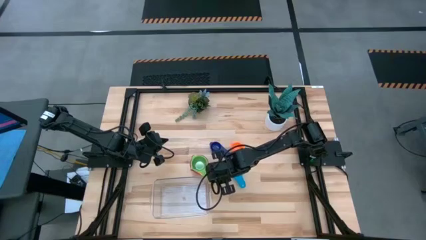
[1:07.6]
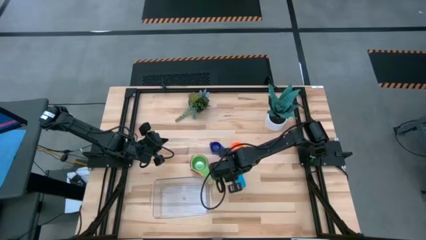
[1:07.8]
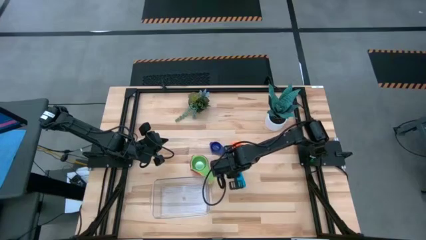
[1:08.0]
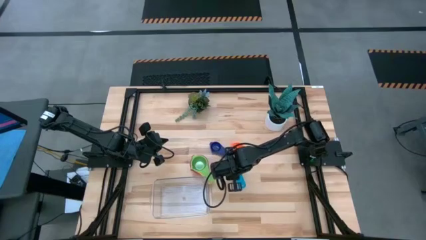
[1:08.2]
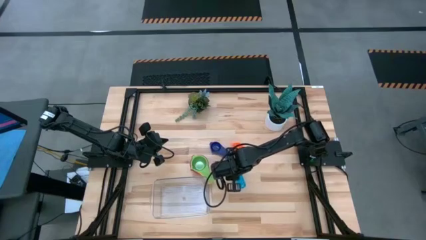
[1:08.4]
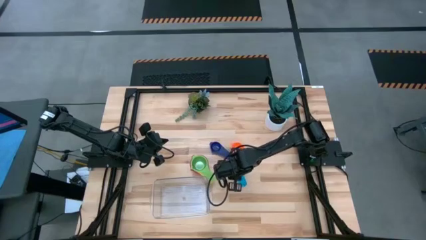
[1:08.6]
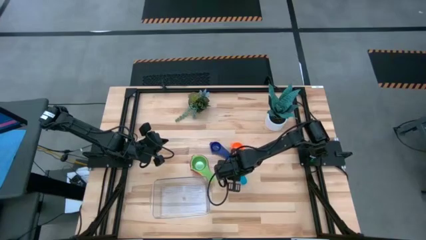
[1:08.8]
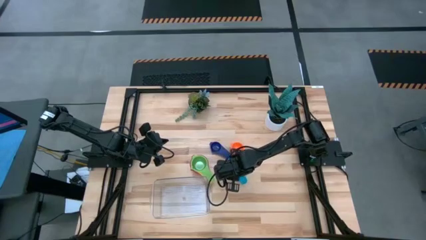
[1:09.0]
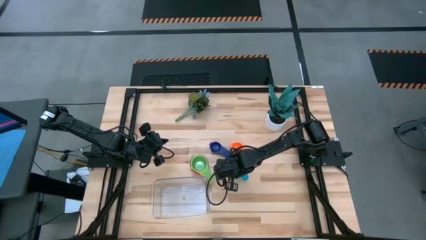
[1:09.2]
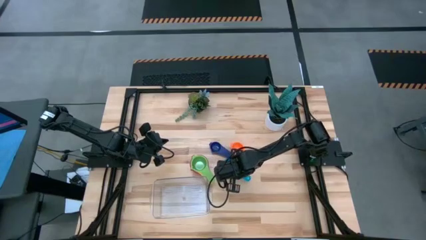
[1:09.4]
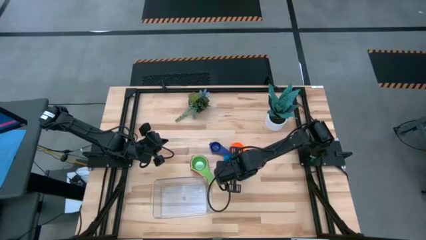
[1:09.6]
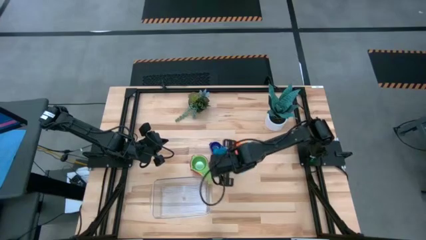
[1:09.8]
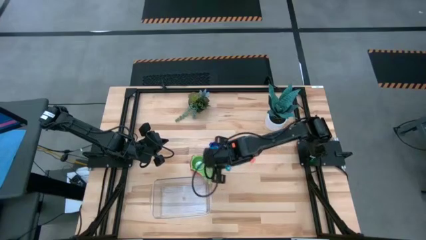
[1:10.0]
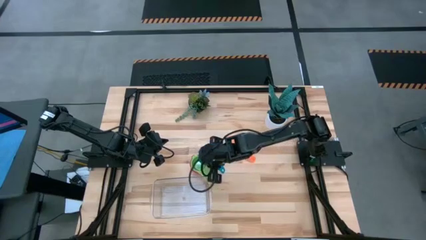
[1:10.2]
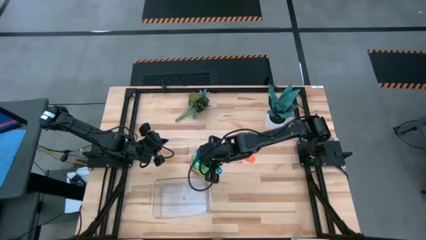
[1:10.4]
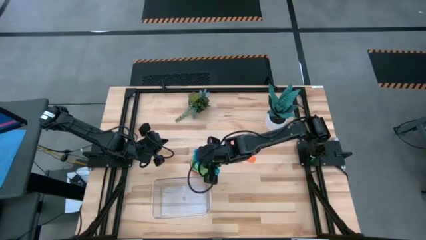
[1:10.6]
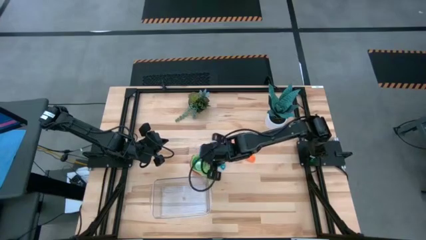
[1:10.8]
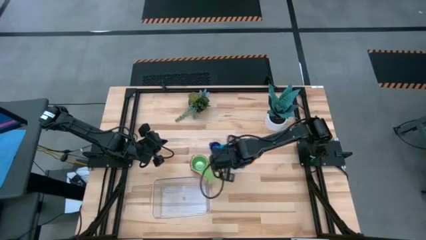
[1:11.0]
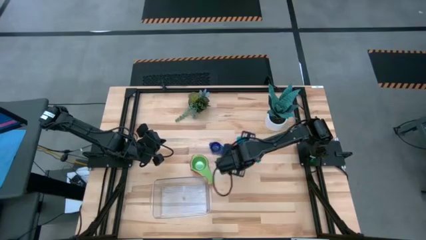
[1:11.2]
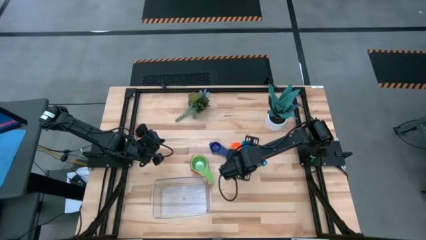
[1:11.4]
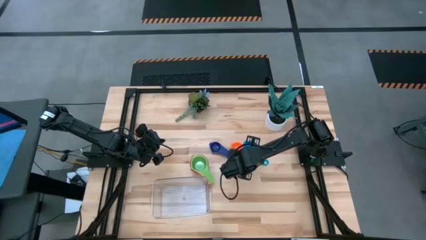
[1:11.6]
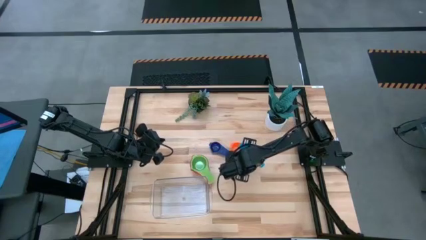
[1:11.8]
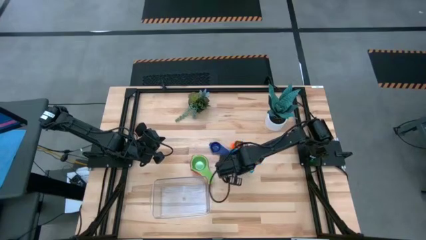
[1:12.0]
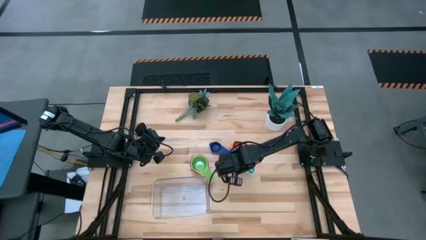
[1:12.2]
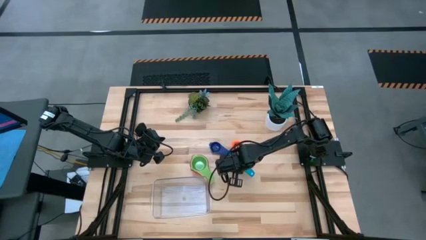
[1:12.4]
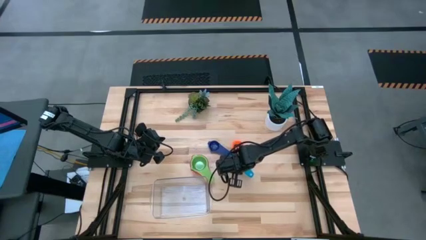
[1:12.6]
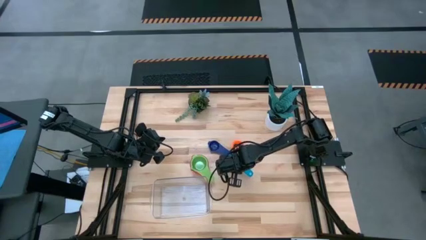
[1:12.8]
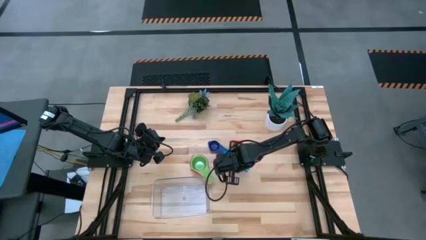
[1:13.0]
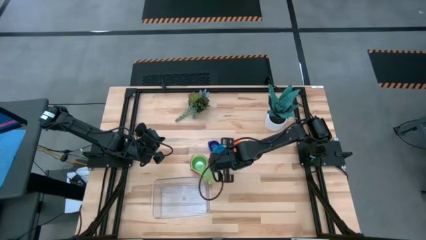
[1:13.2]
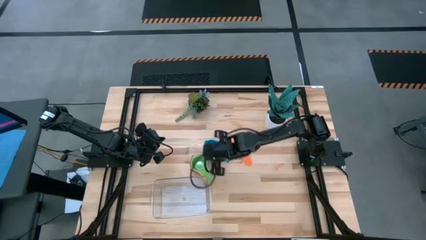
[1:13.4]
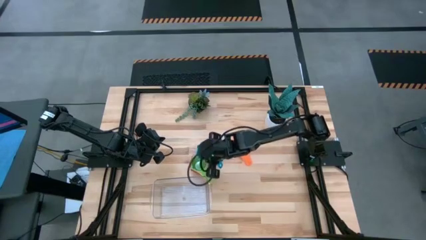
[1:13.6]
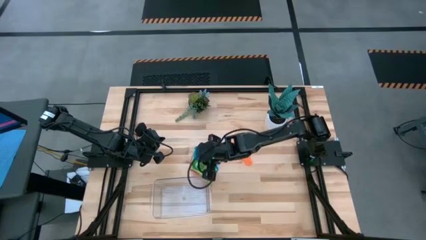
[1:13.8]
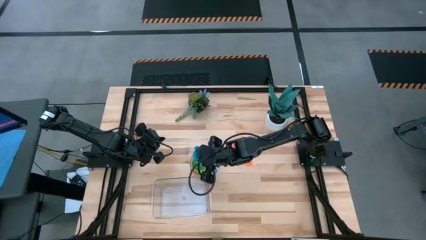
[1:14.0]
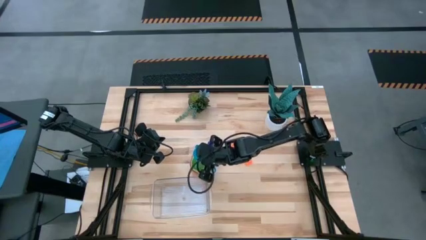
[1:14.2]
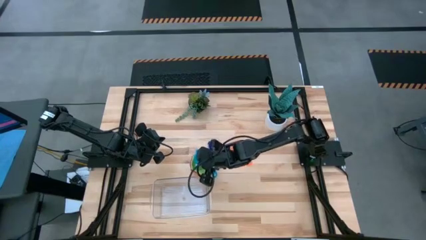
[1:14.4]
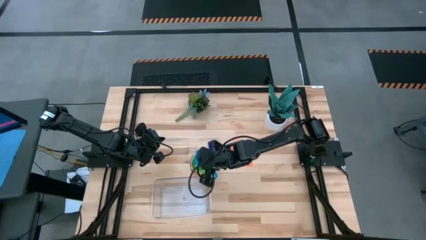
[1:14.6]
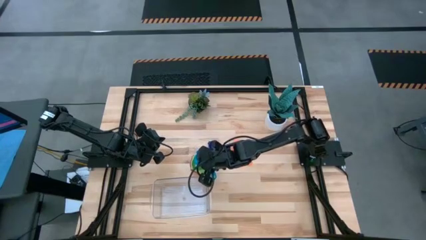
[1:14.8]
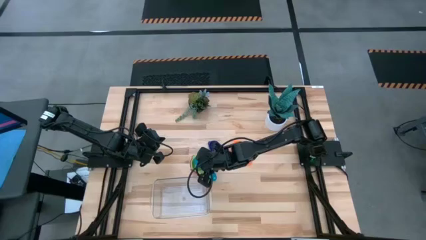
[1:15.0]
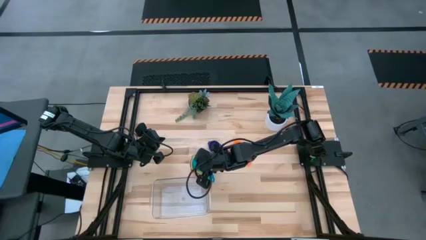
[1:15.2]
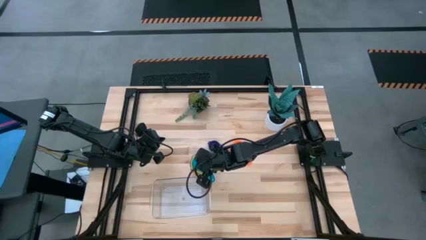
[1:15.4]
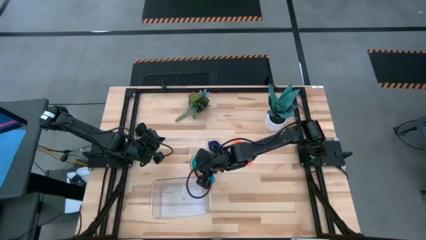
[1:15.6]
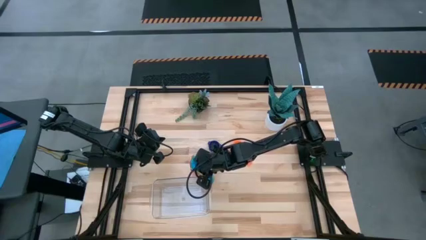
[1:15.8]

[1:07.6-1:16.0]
Task: Nest measuring cups in basket
Stack the light blue measuring cup on the green measuring cup

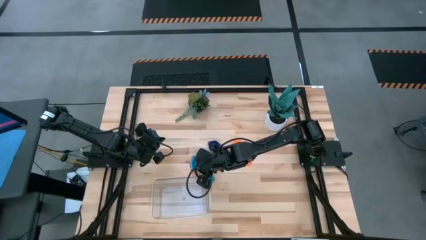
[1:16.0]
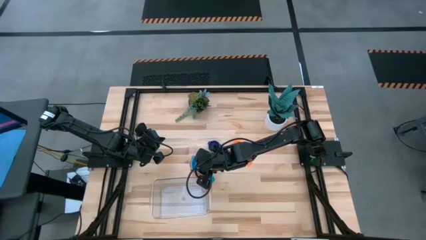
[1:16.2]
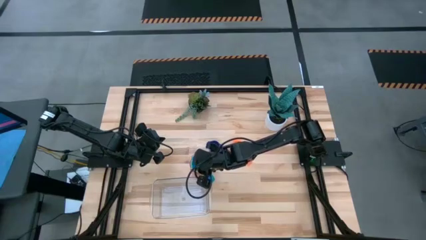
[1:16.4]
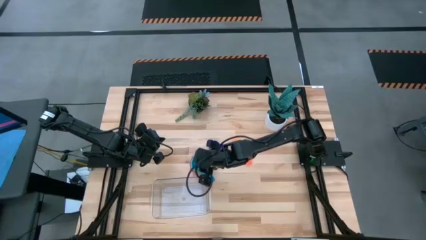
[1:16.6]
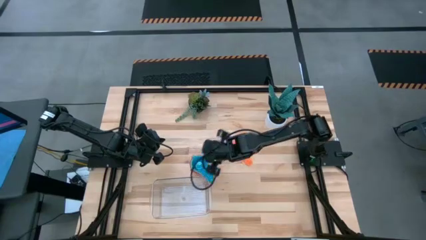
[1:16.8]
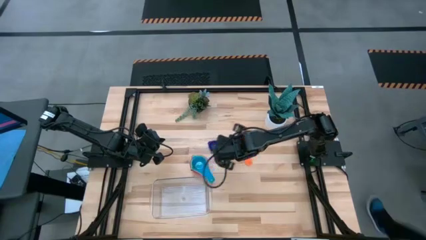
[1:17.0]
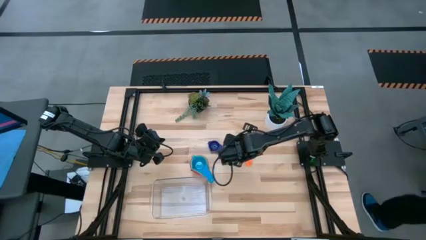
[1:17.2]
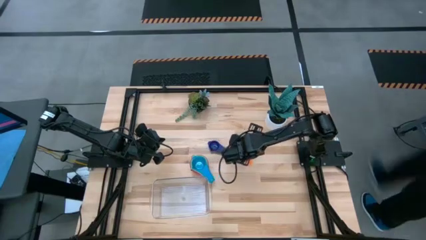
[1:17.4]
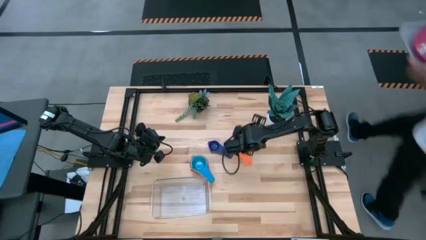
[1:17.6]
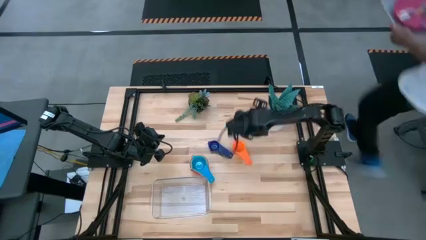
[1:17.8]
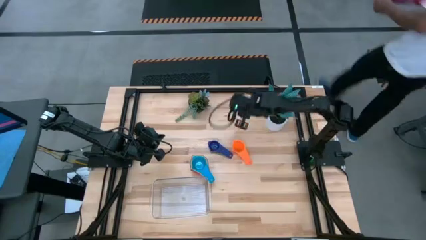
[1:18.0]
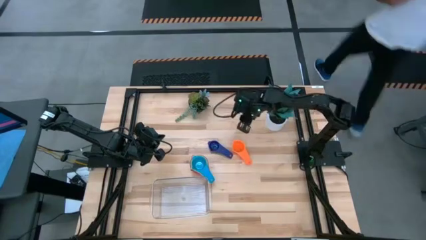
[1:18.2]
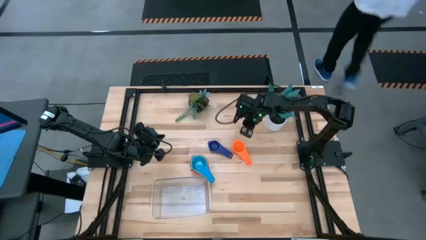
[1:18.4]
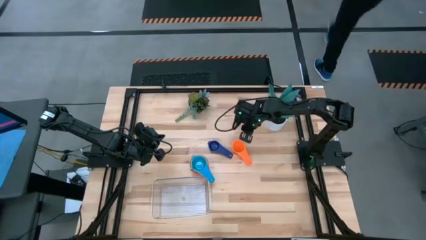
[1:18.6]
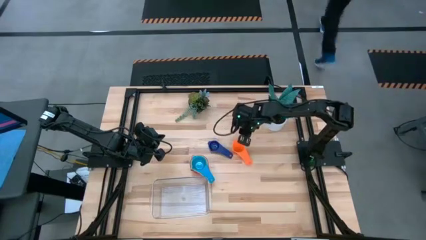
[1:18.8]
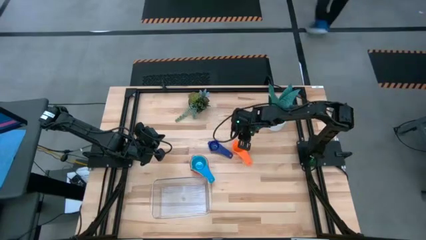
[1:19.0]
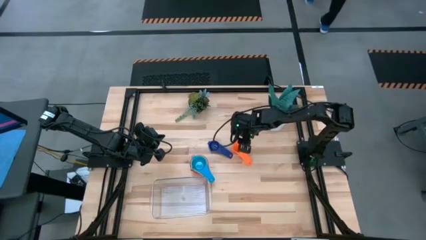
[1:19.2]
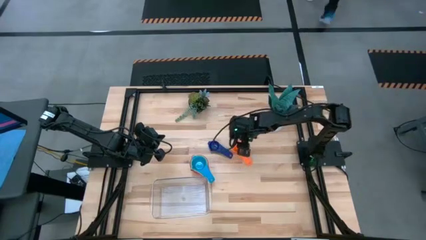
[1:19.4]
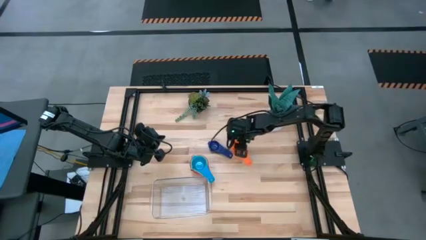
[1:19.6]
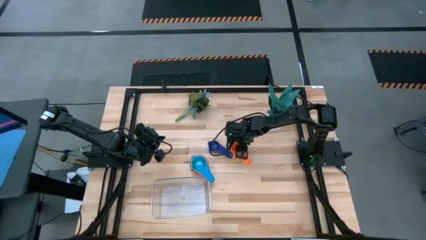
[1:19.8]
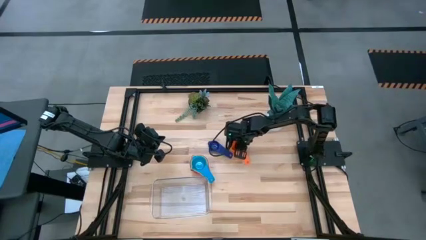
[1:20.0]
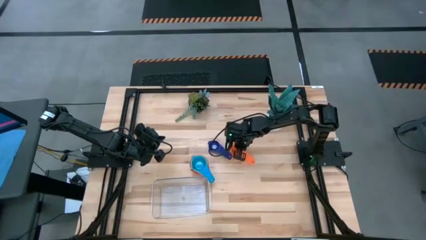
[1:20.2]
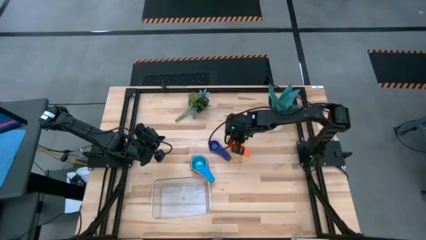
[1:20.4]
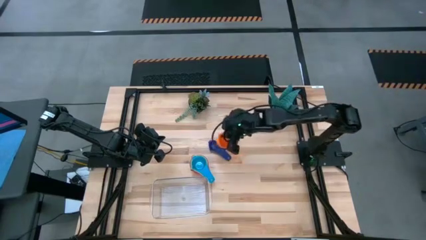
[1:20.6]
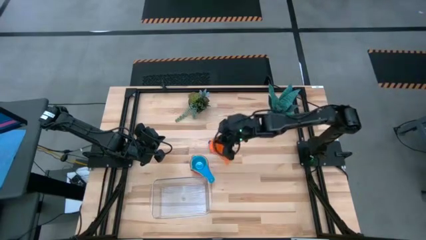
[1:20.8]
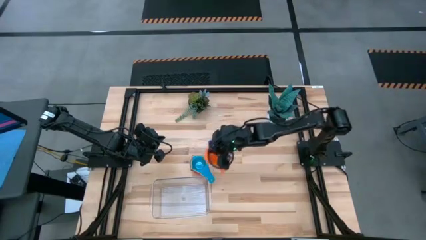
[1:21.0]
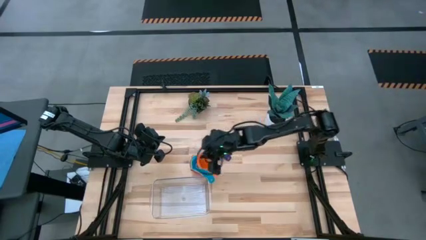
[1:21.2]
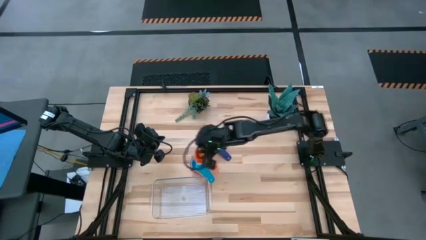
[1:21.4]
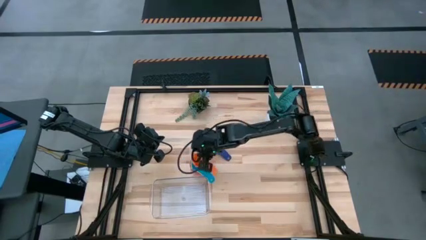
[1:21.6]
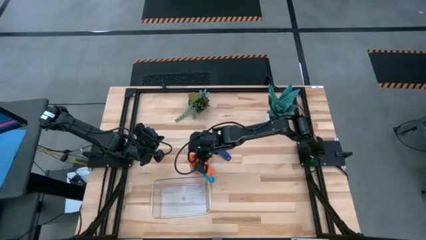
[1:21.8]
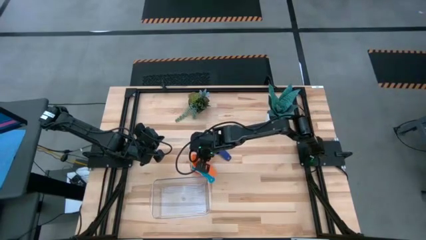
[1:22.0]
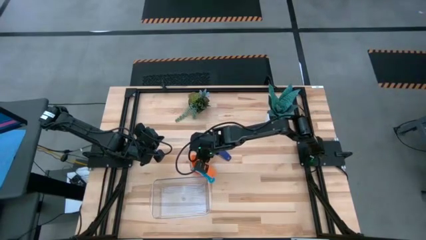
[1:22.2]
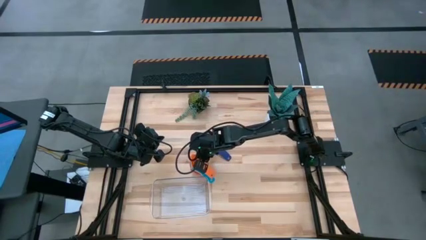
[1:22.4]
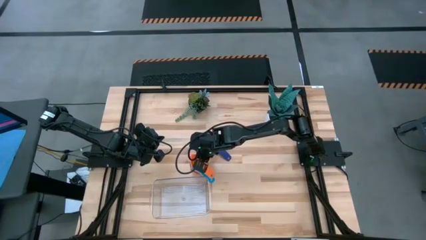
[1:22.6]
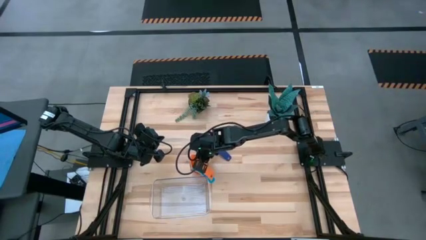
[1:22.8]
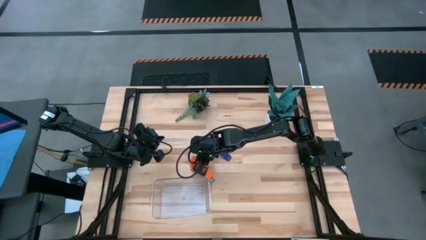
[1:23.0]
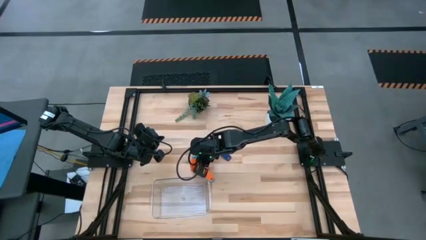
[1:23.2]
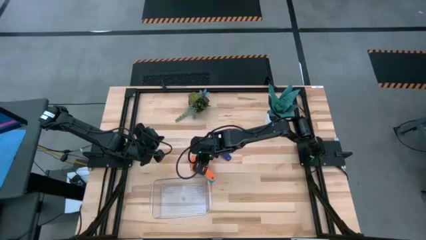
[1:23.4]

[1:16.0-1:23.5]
Stack the orange measuring cup on the light blue measuring cup

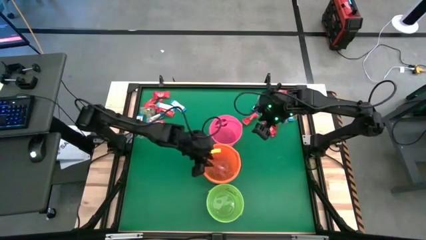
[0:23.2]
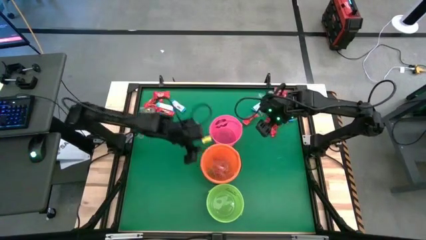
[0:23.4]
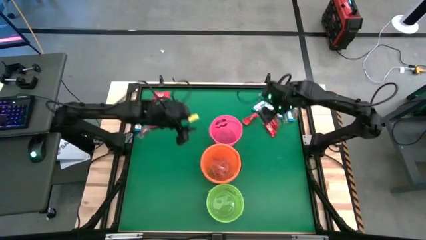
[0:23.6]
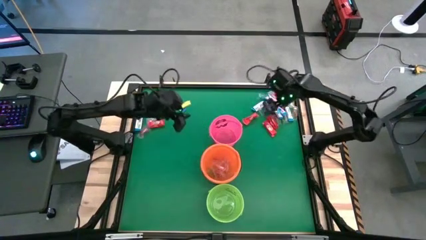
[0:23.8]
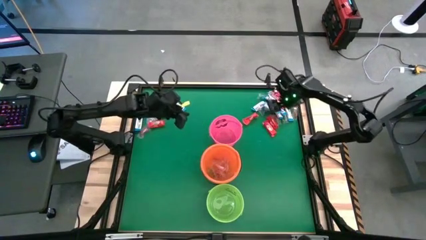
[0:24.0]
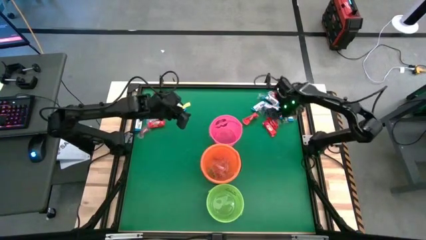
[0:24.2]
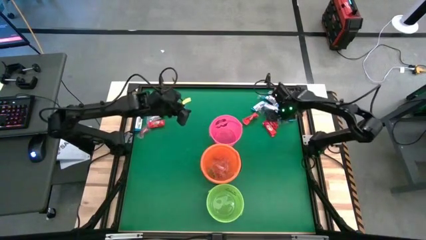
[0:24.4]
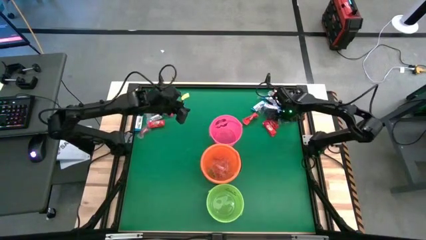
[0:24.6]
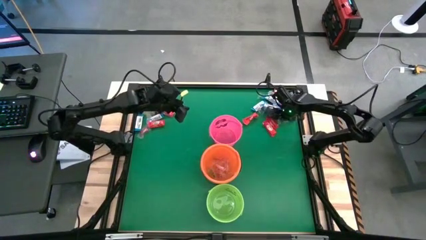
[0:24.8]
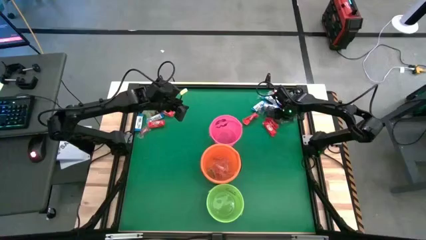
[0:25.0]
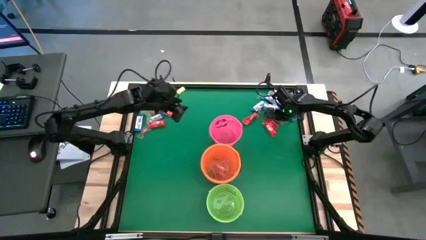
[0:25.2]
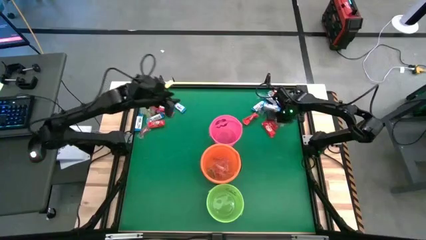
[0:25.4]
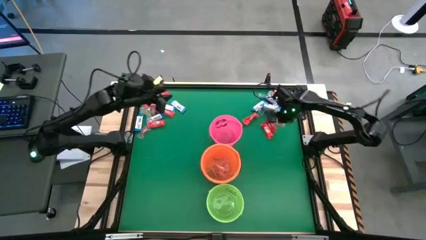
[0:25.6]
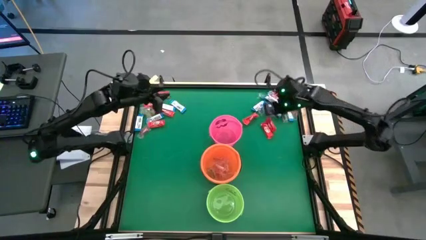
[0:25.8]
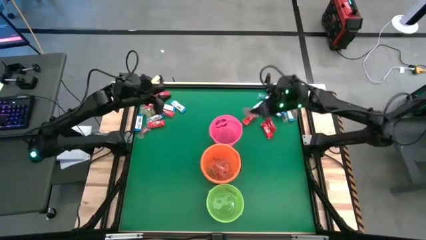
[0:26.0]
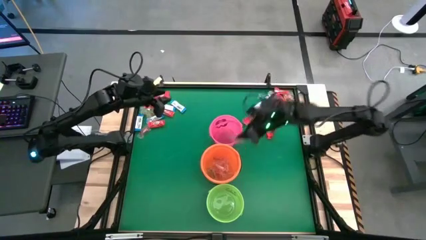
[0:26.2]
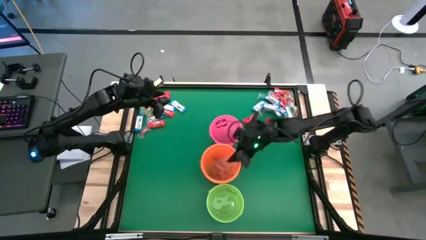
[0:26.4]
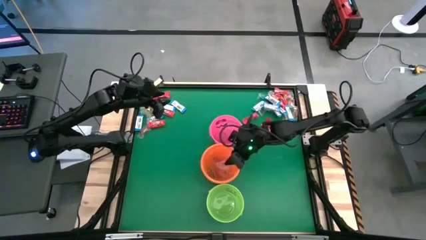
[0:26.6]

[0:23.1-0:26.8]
Task: Sort candy by brand, put in halloween buckets
Put the orange gummy into the orange bucket
